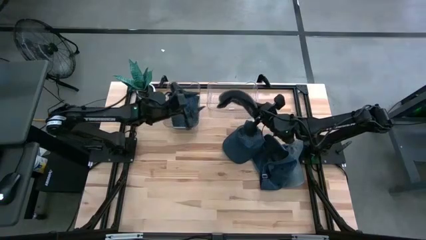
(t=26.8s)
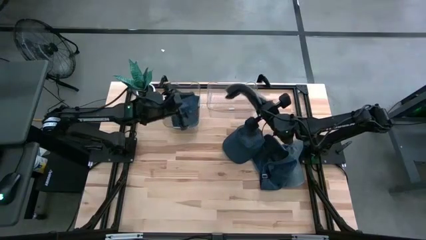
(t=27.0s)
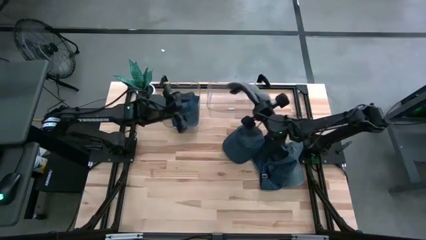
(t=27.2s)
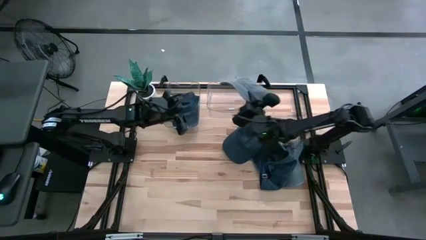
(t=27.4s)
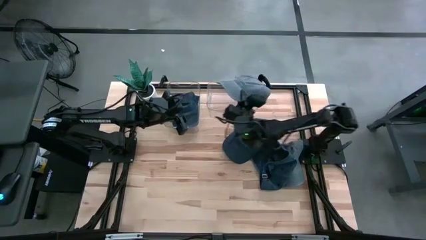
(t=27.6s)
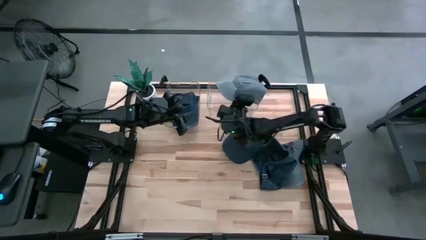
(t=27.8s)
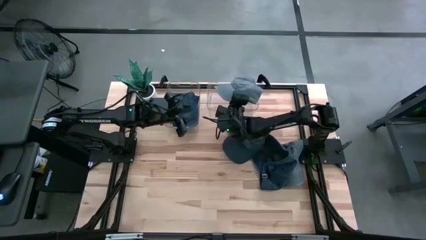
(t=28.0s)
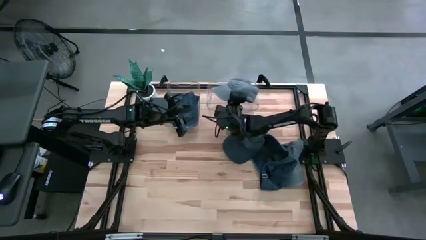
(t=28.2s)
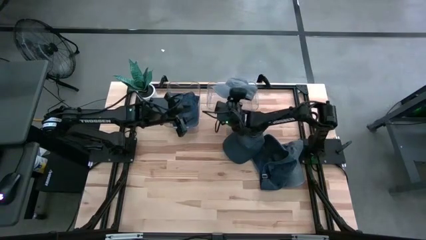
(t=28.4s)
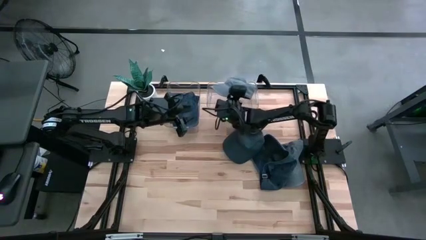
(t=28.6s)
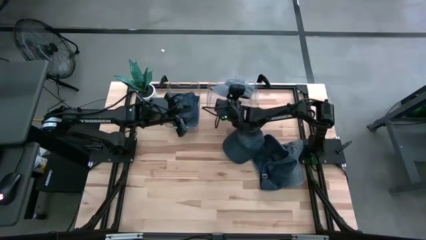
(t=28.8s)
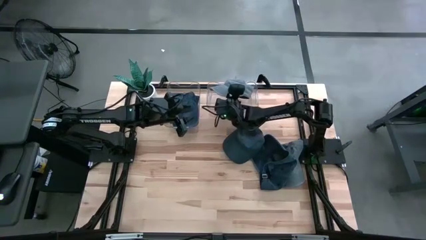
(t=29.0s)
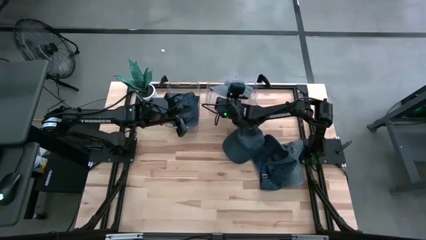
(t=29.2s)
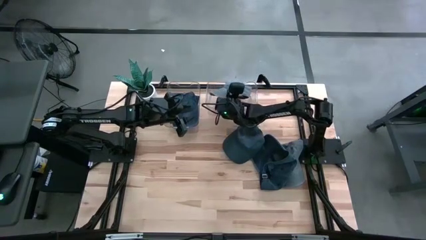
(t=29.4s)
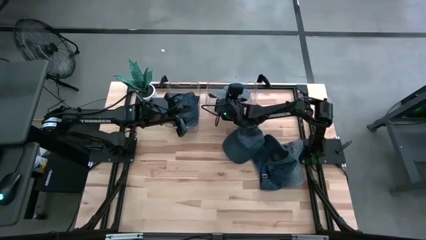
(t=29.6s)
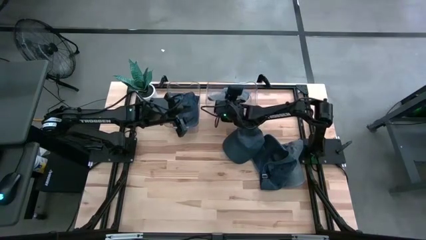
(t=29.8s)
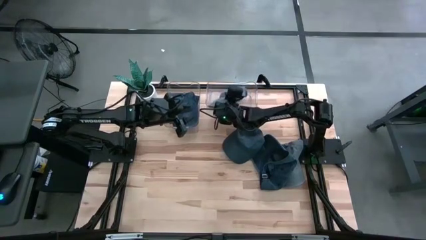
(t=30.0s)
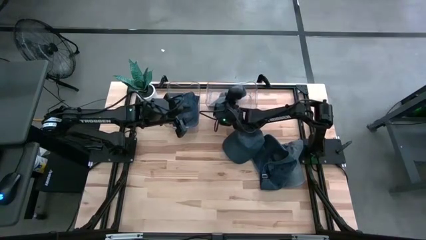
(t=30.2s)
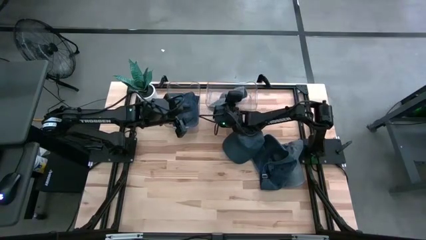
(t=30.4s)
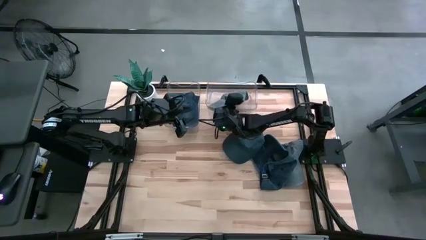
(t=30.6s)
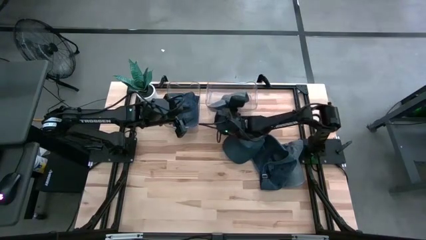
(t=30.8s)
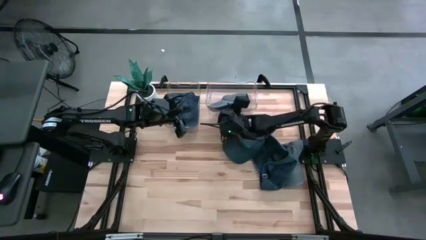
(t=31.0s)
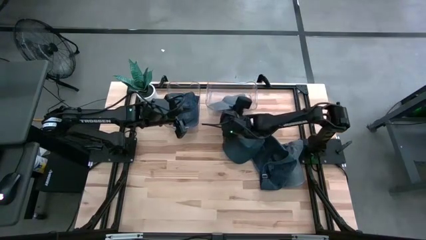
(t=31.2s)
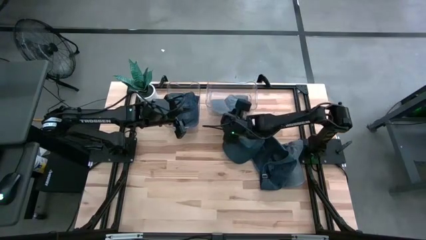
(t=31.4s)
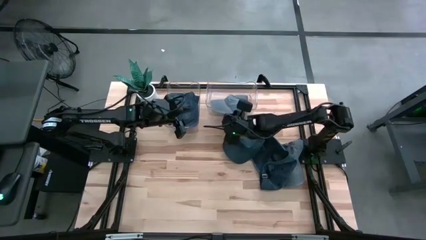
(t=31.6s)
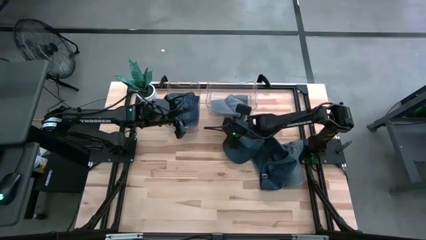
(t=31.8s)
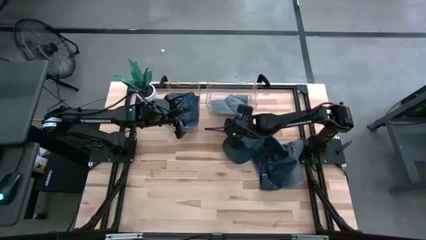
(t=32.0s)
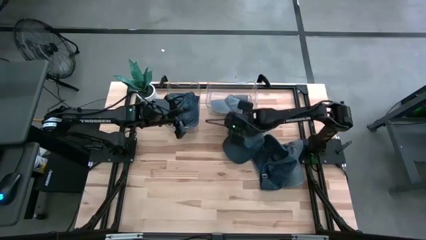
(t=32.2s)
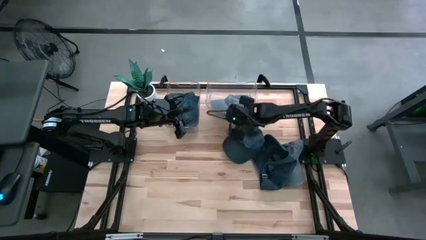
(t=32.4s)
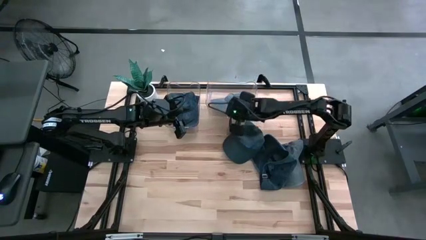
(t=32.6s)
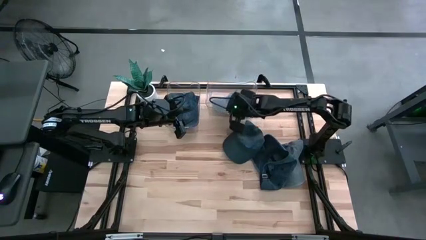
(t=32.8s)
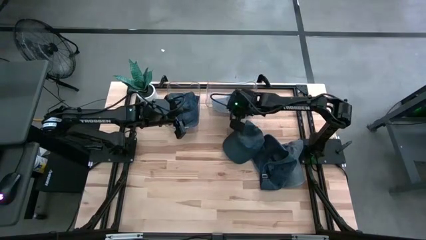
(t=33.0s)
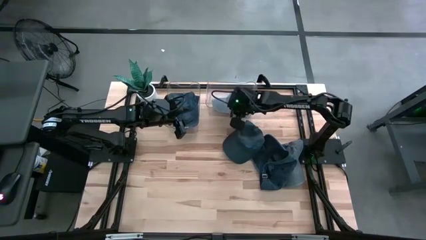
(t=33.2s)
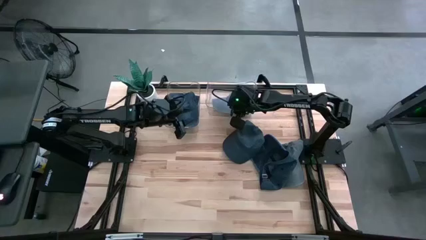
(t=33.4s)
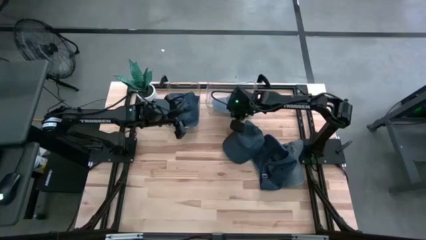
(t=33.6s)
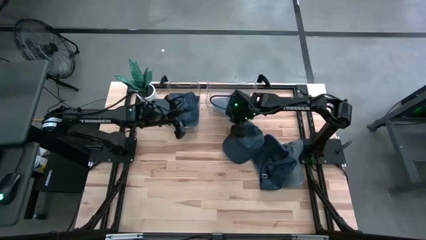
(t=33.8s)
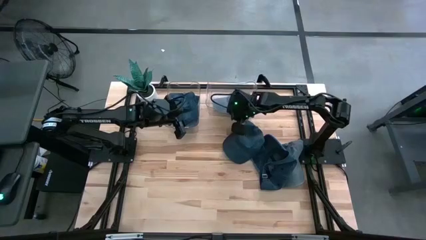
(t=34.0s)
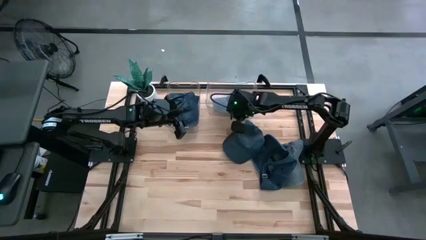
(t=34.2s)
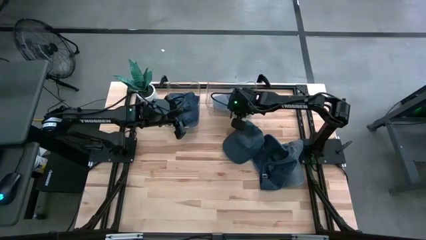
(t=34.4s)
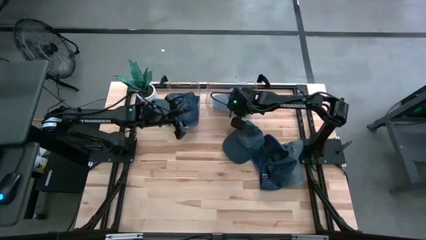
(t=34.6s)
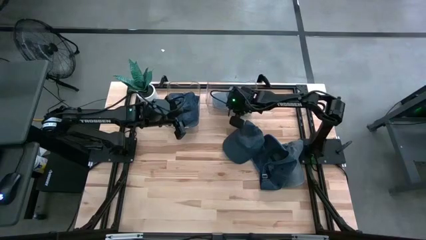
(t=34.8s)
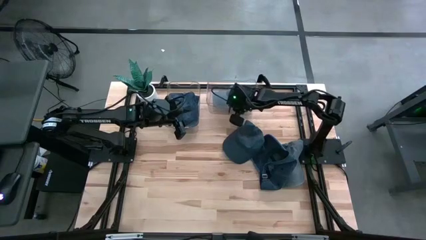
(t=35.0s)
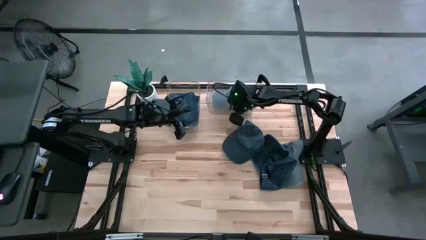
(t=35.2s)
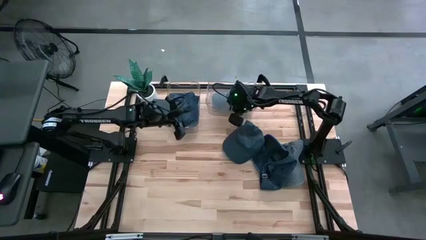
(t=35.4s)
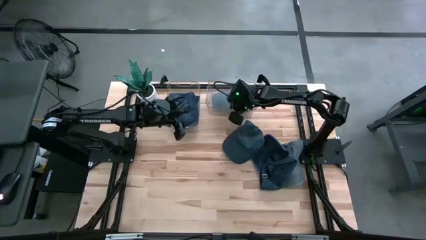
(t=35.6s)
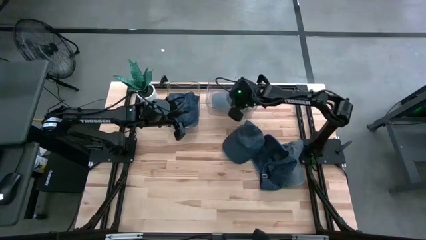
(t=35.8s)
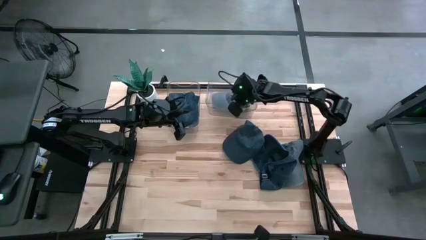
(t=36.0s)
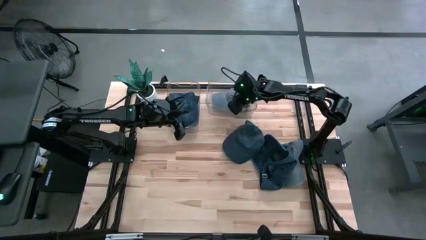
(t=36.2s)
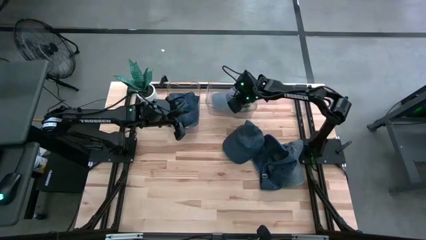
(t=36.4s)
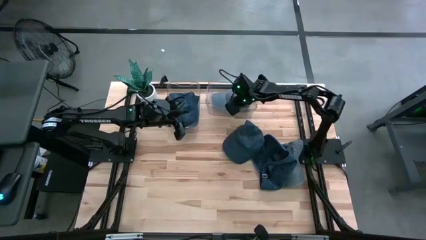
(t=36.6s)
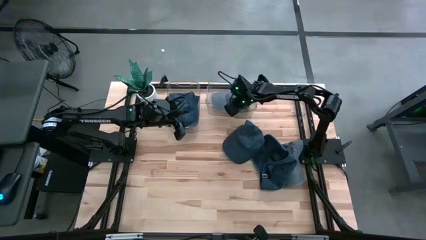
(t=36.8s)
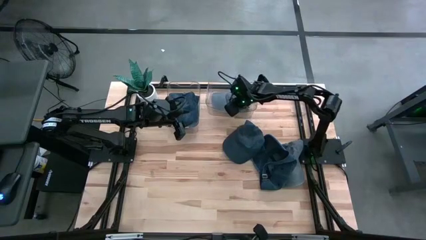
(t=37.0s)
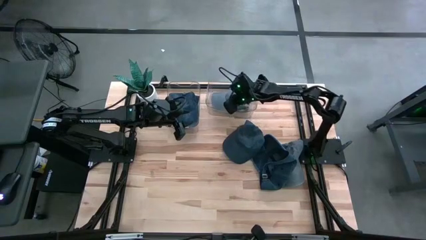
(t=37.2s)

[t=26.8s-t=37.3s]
Task: Pick & Place hat
Put the left gray cap into the right transparent bin

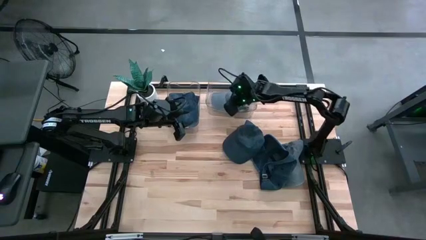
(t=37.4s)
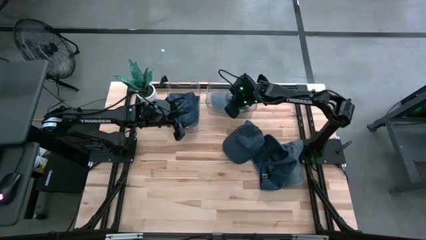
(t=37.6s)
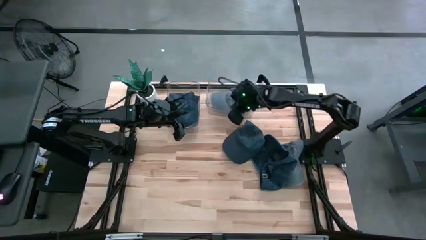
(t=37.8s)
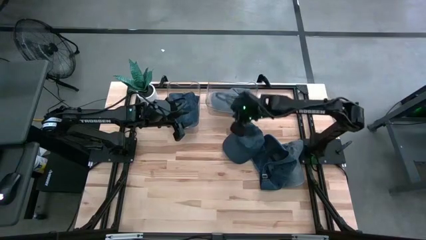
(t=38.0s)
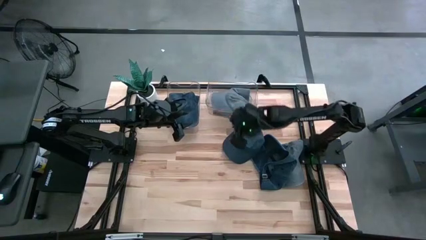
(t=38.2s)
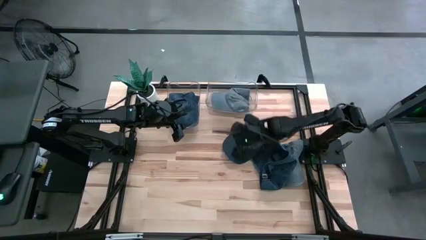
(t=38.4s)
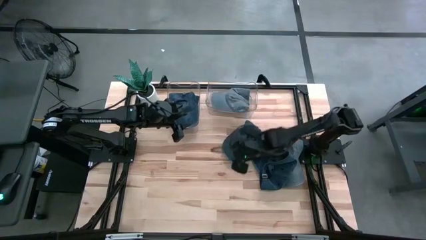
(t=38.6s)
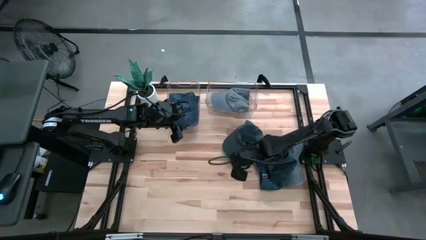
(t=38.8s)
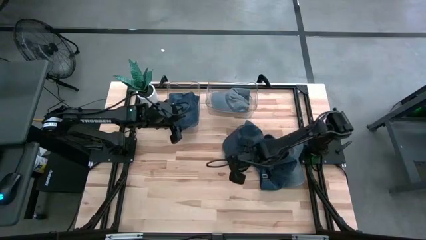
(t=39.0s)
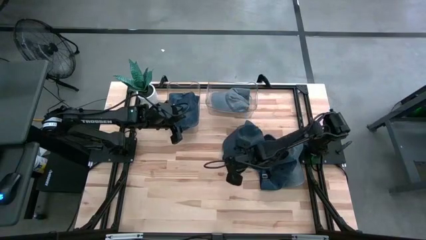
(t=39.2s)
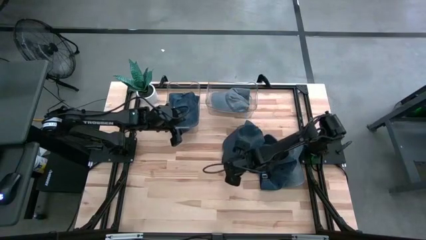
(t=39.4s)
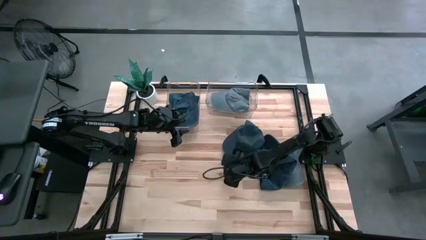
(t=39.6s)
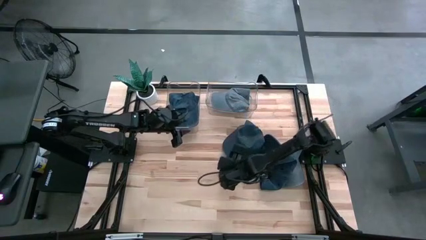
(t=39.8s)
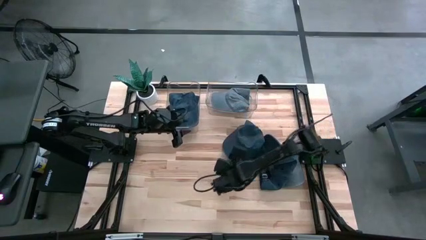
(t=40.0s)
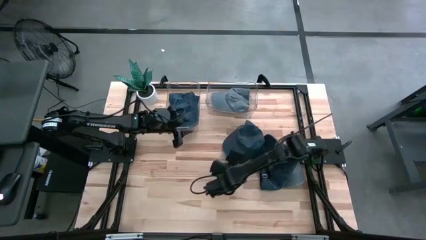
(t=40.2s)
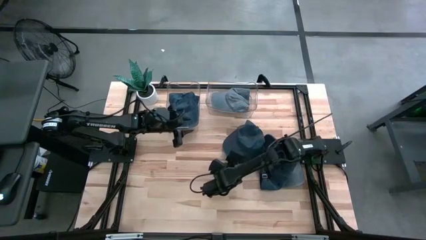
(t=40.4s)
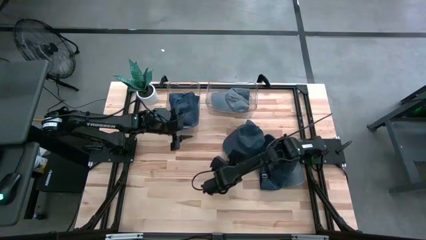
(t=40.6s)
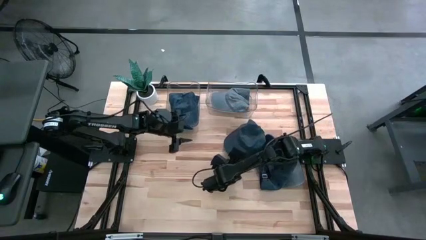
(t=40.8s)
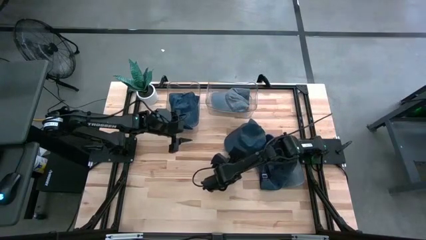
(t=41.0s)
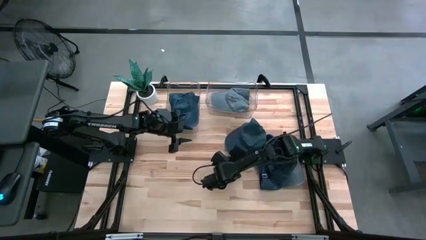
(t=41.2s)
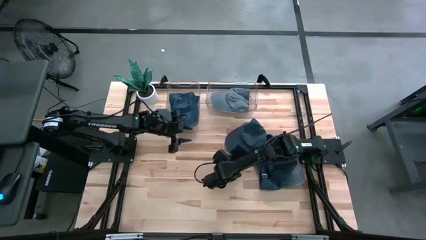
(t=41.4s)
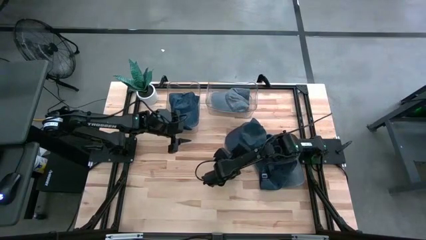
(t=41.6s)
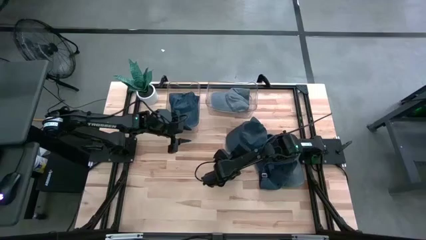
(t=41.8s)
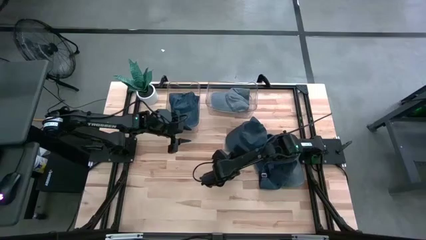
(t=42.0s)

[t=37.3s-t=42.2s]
Put the top blue cap into the left transparent bin
